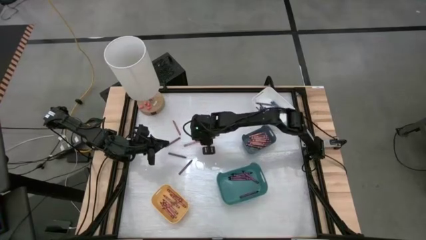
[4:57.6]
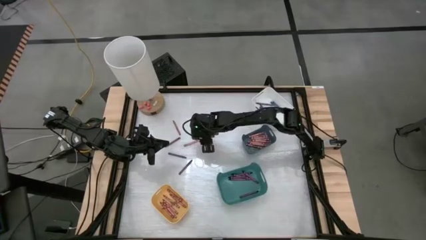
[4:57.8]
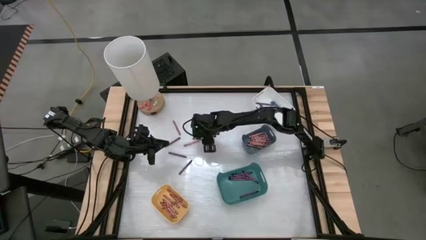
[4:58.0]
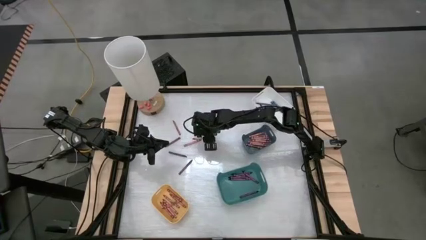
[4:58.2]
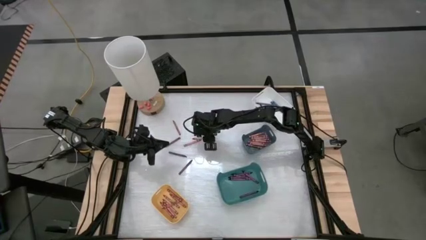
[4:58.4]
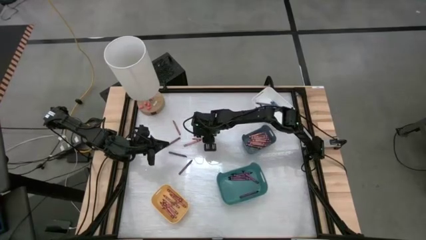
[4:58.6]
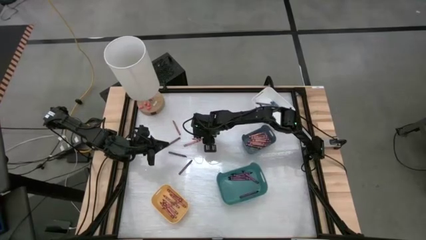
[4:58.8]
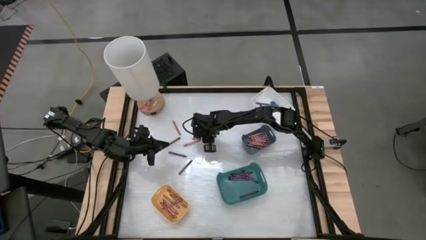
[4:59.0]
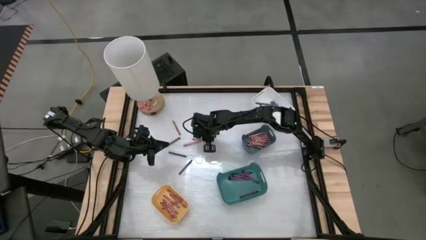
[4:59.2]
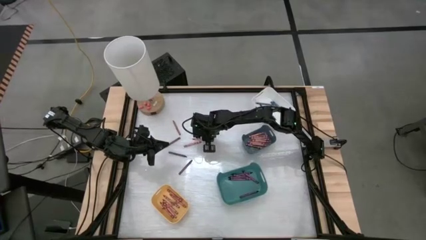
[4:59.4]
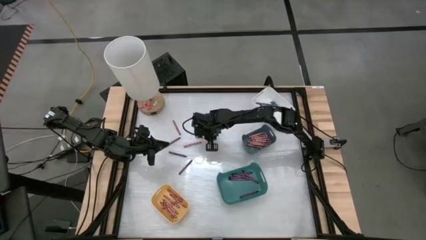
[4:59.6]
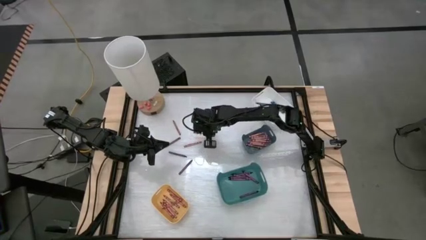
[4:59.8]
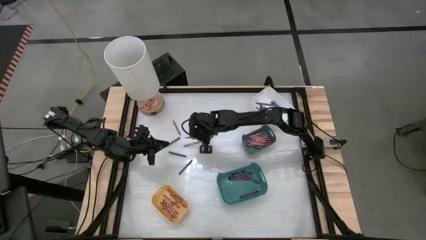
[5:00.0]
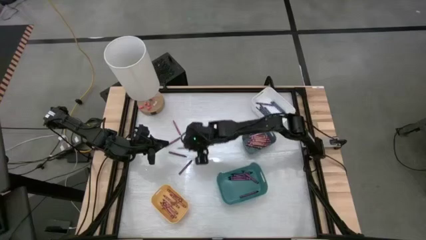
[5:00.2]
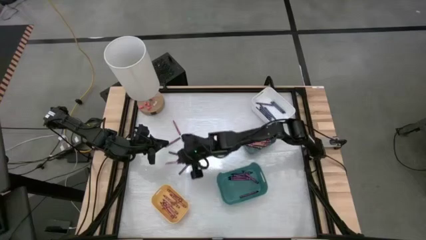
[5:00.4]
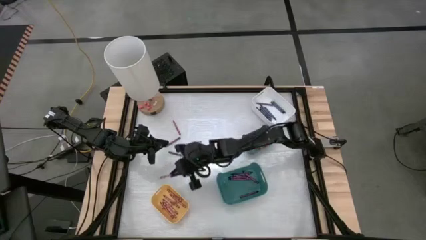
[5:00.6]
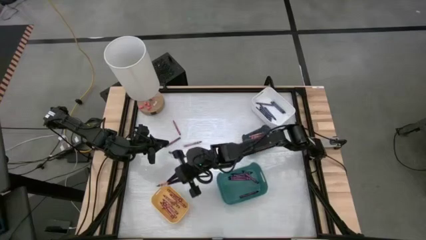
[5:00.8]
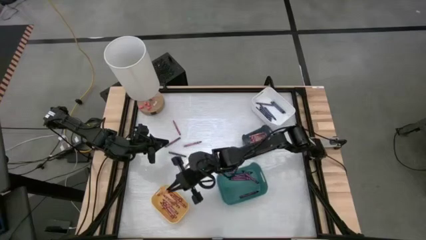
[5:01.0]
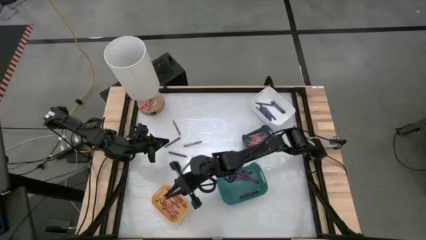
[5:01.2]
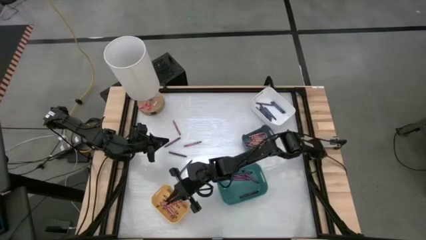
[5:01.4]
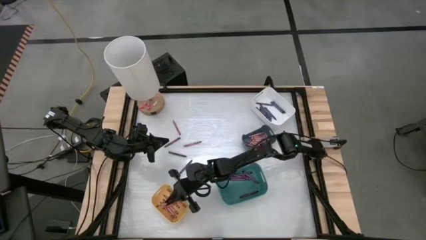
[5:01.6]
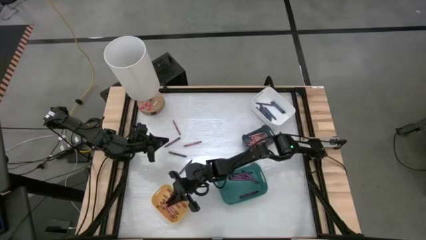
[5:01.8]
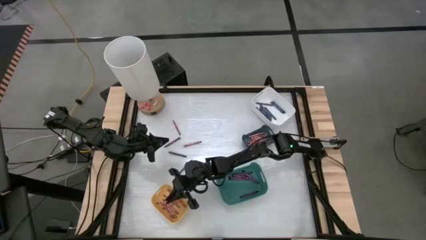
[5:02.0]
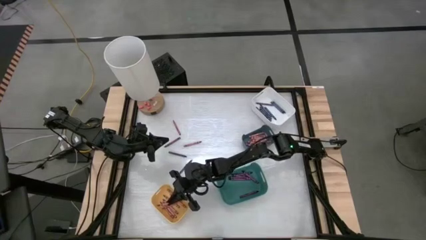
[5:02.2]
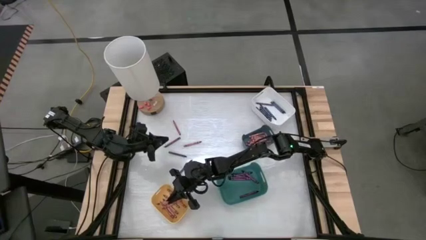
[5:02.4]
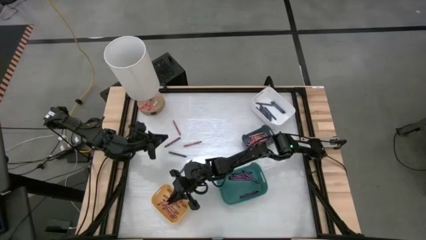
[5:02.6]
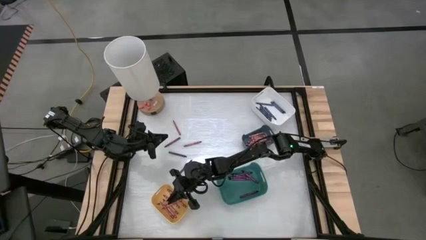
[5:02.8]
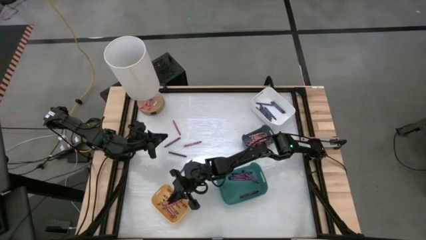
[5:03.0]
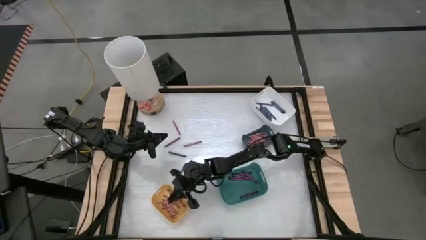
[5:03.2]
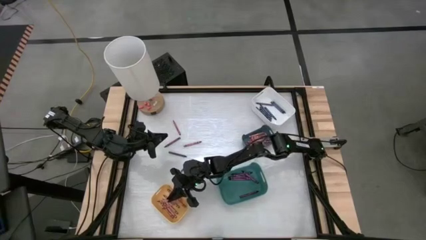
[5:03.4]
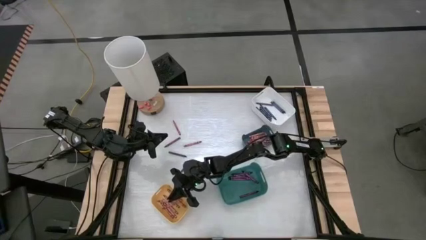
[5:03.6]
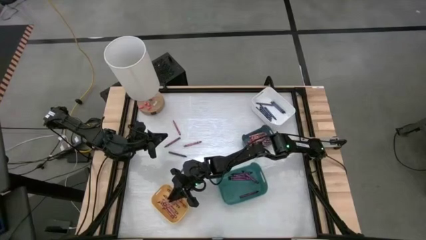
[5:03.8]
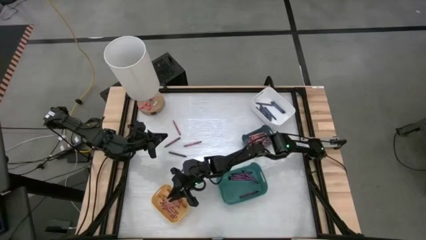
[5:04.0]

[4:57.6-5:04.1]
Task: Sort crayons
Put the red crayon into the yellow bin

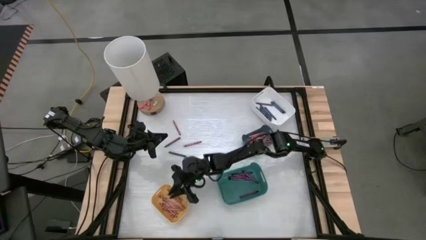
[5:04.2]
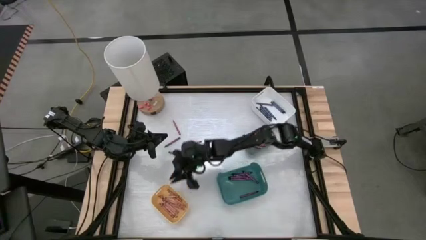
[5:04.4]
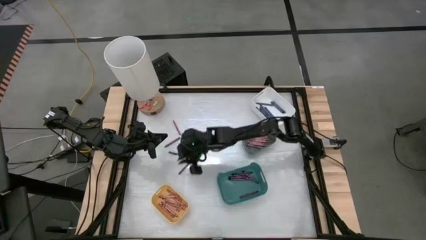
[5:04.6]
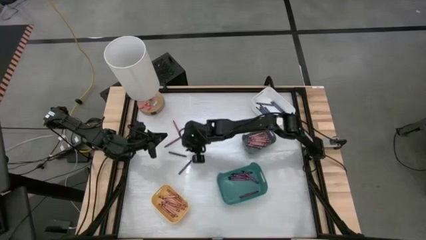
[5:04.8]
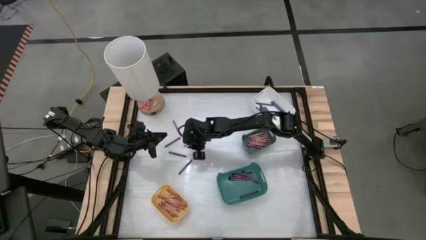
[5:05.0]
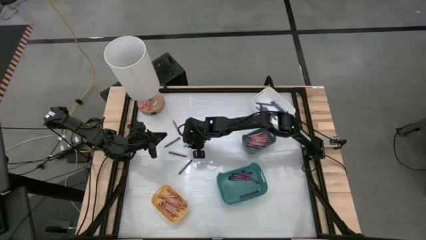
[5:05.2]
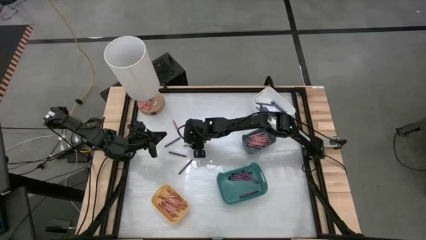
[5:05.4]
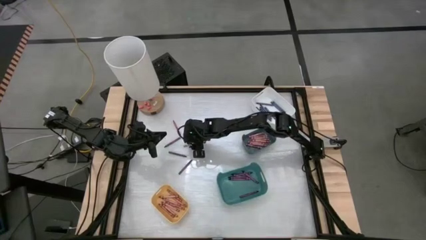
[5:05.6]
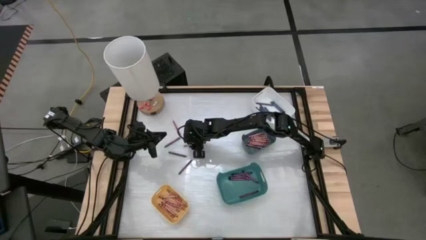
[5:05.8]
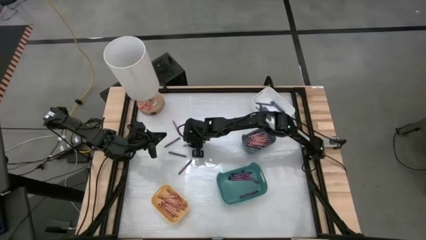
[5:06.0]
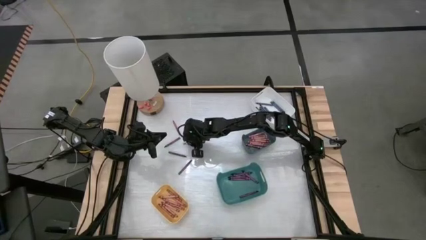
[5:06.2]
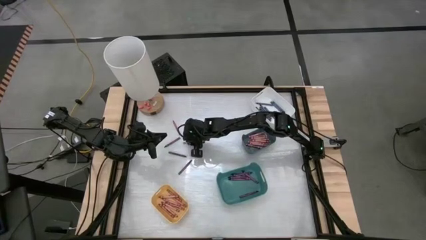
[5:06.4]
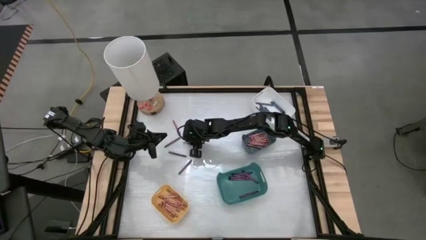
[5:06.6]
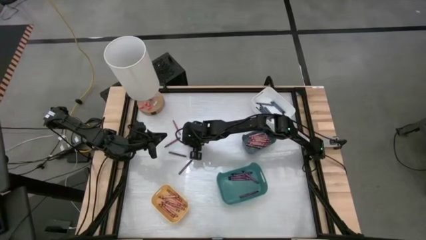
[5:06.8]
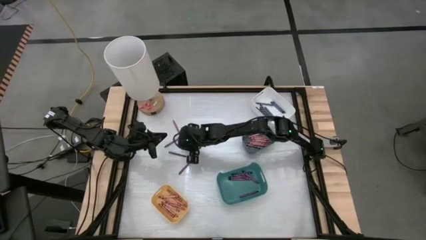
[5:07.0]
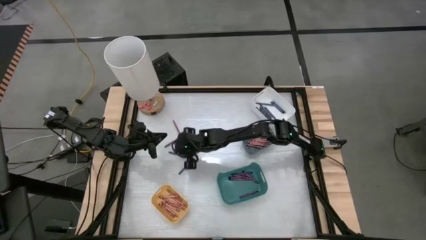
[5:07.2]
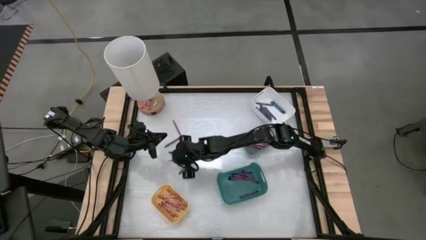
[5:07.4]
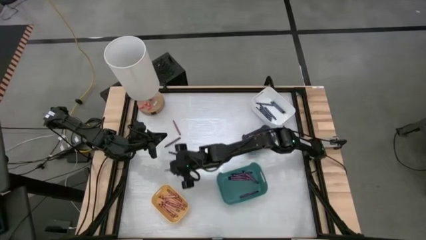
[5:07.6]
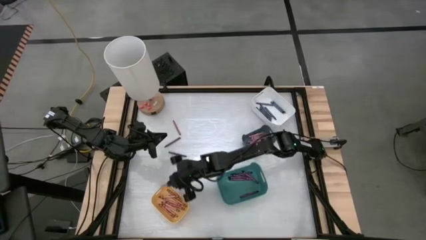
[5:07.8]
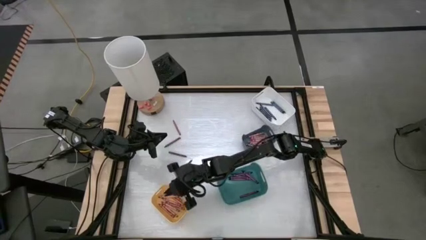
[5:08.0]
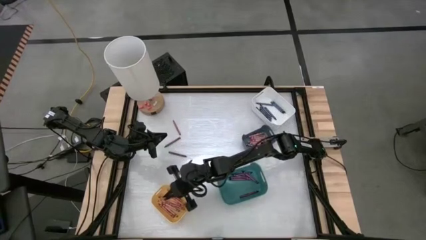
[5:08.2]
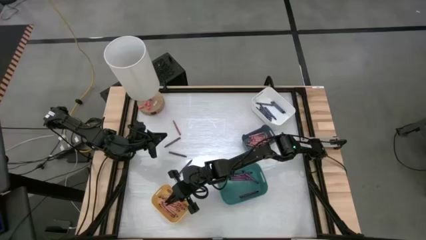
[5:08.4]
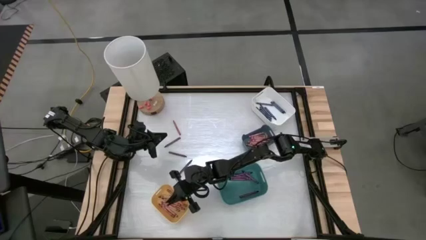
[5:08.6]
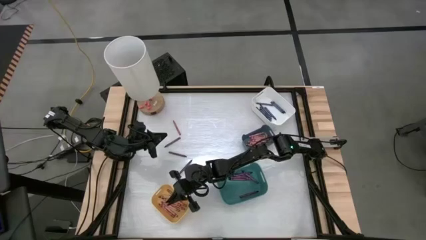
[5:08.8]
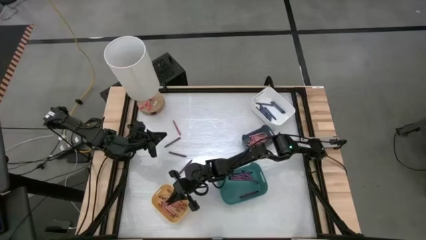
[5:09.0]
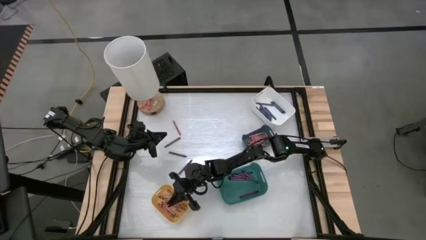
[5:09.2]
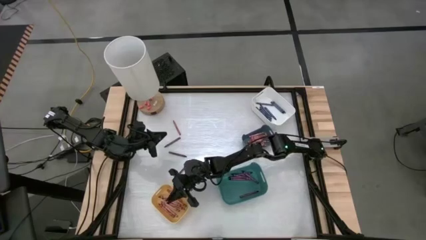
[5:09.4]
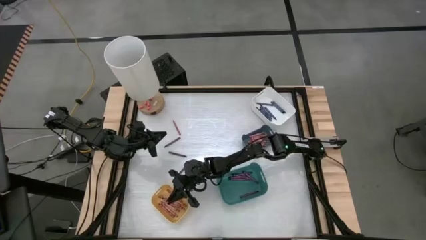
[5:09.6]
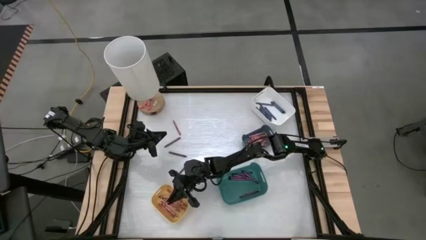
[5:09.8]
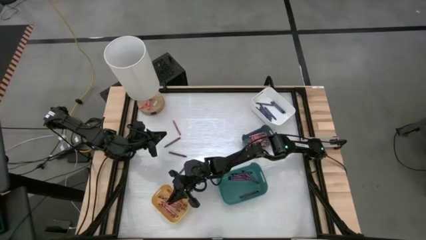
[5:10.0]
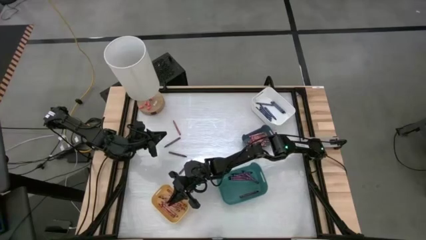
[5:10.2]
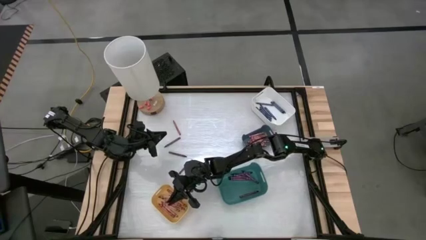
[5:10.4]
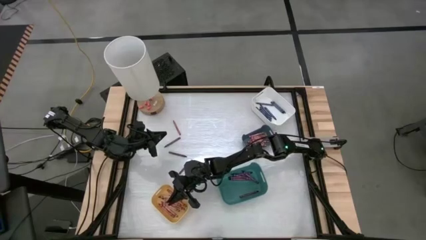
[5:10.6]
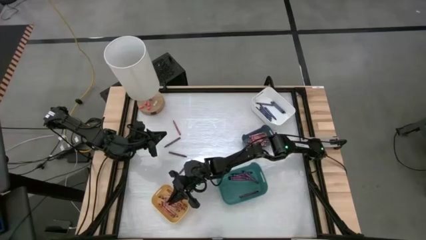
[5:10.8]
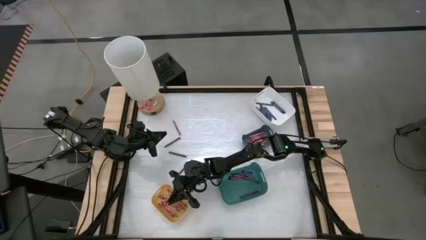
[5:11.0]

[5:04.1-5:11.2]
Put the red crayon into the yellow bin

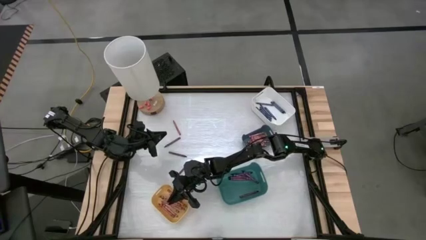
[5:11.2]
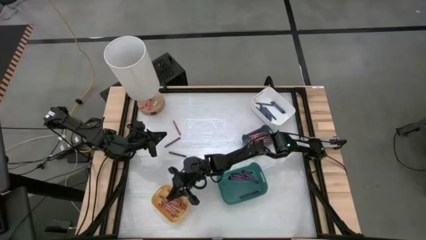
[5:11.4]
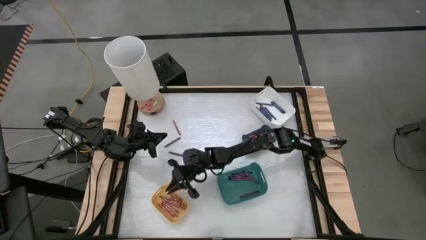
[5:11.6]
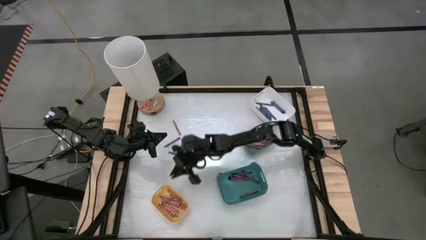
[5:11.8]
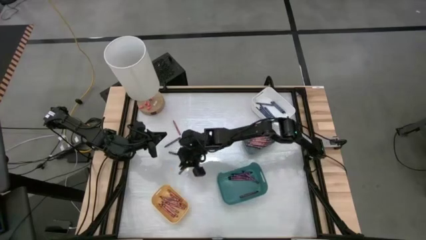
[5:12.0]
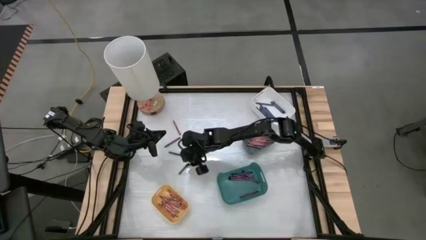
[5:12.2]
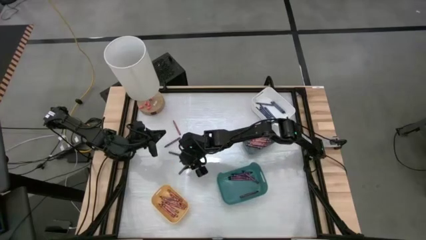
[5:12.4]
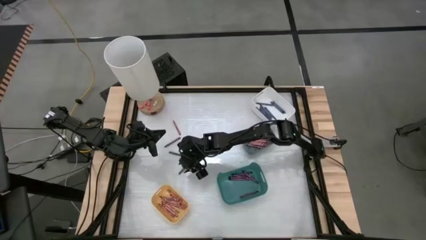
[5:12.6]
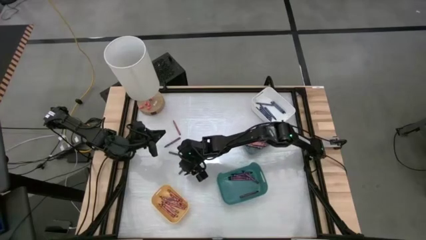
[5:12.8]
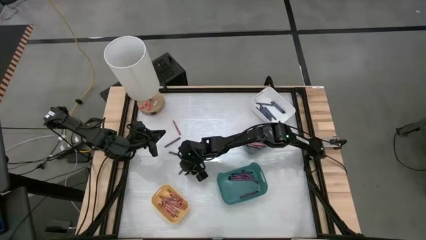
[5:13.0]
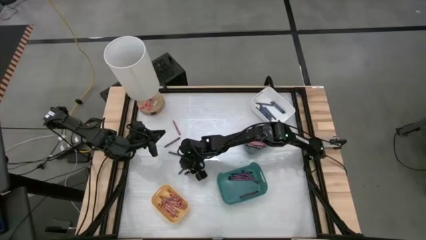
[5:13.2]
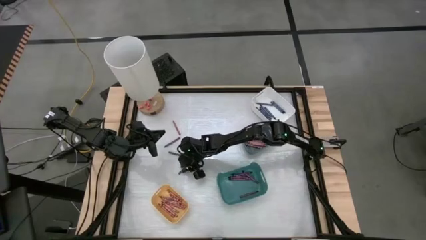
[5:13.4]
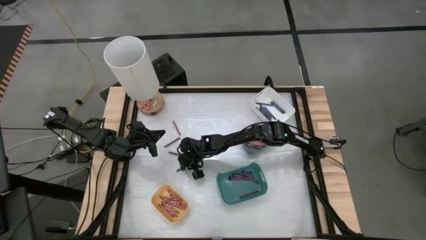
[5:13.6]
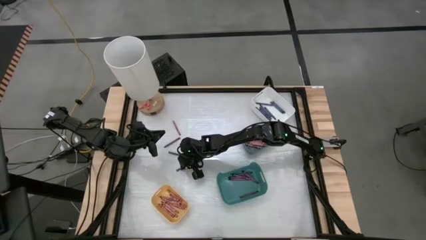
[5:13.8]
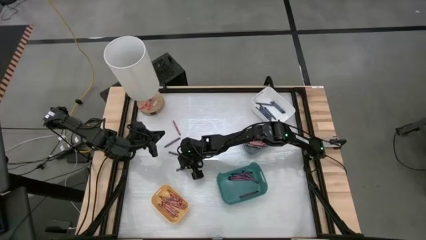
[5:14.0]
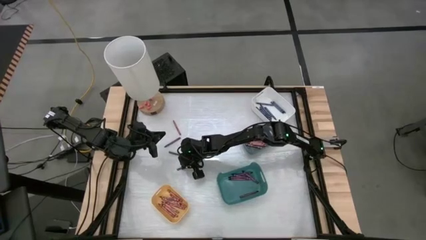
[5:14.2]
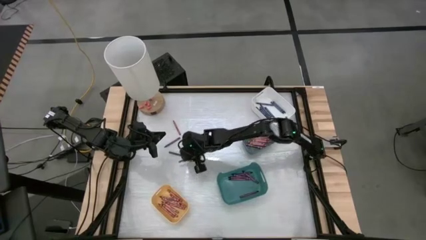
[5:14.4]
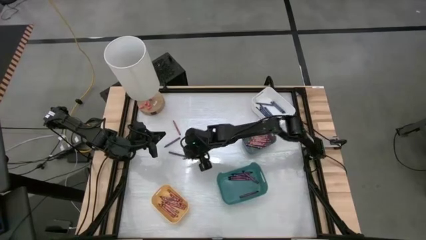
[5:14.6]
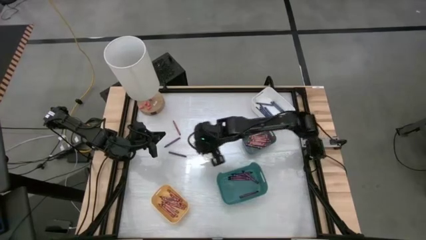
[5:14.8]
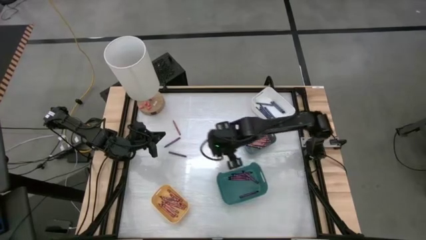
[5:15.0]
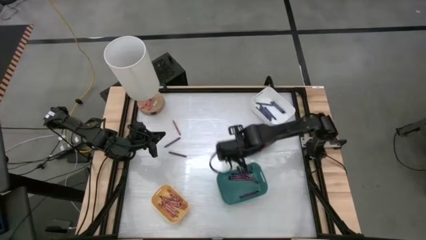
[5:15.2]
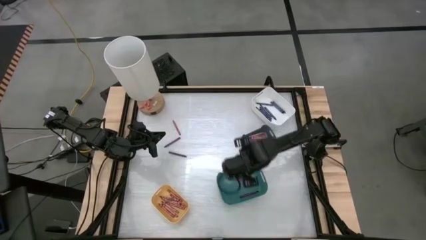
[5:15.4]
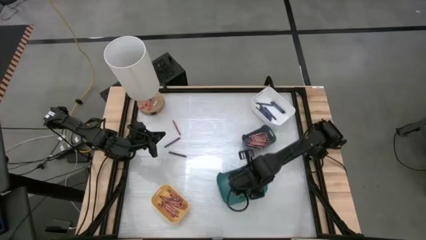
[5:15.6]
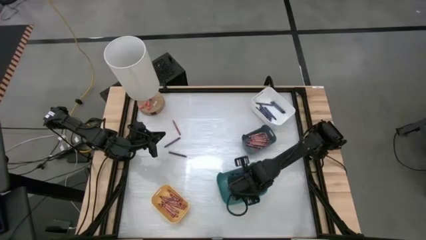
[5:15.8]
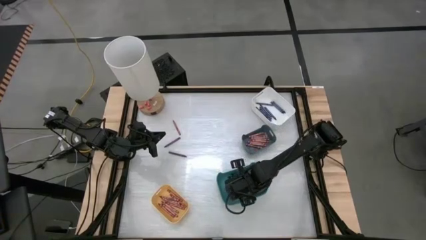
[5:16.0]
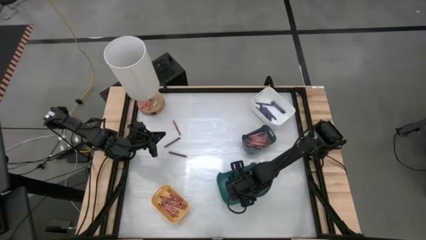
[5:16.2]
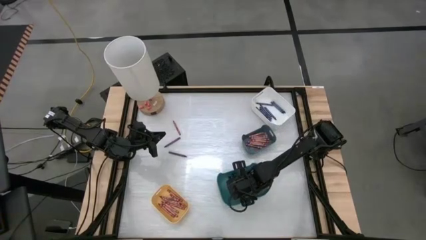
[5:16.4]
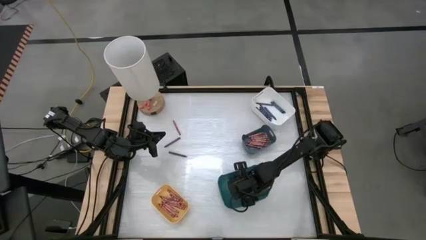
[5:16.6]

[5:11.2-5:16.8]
Put the purple crayon into the blue bin
